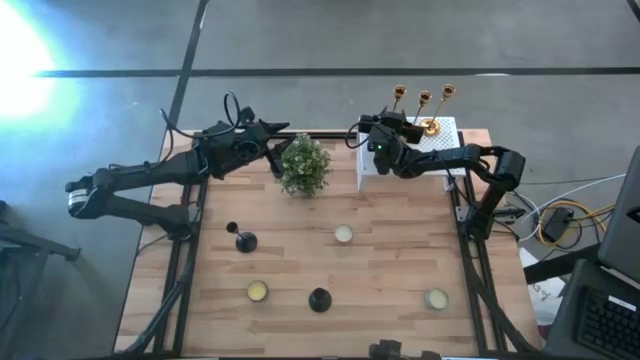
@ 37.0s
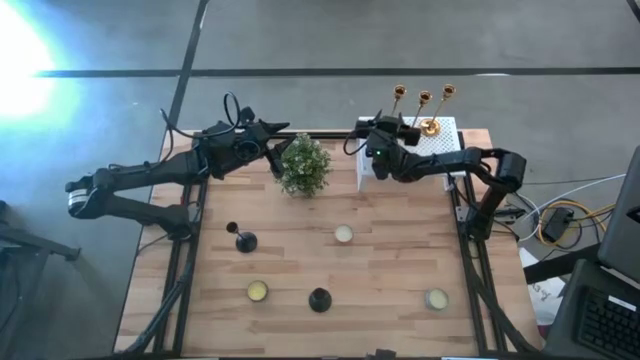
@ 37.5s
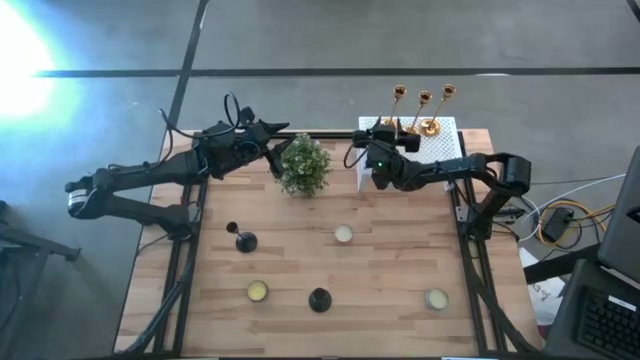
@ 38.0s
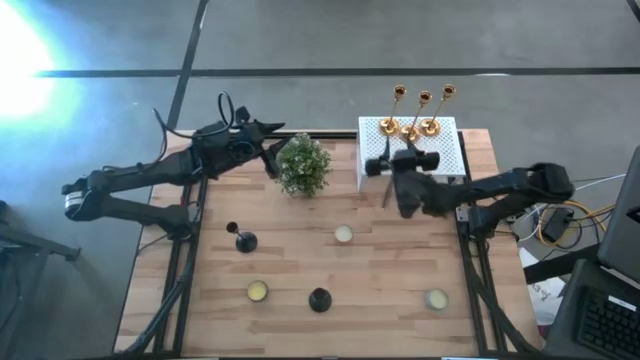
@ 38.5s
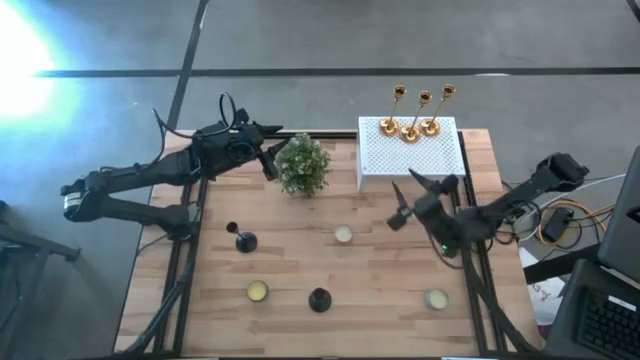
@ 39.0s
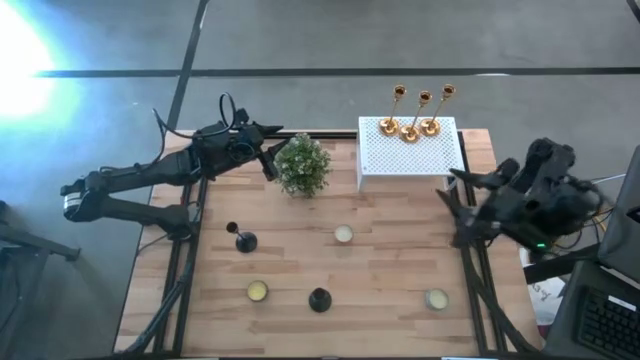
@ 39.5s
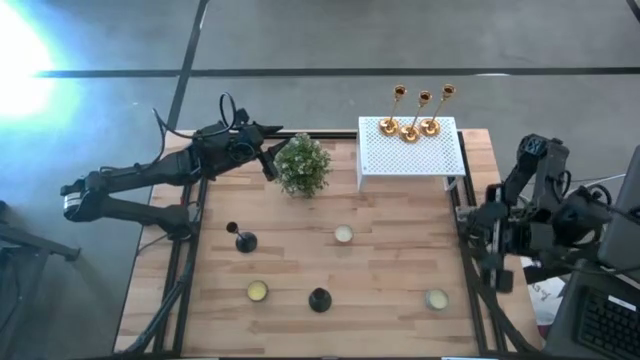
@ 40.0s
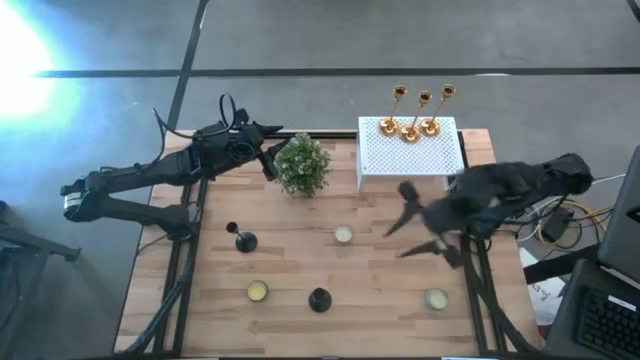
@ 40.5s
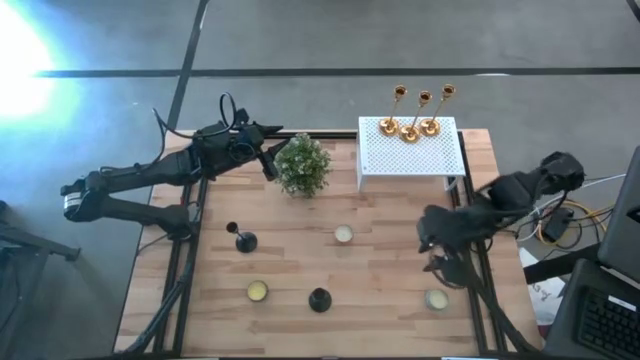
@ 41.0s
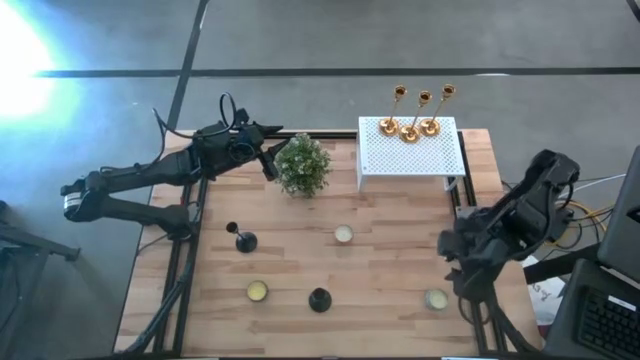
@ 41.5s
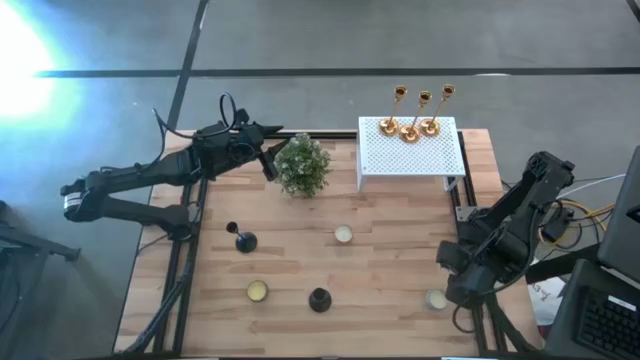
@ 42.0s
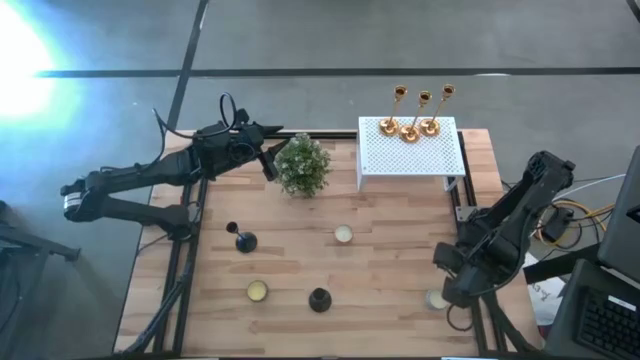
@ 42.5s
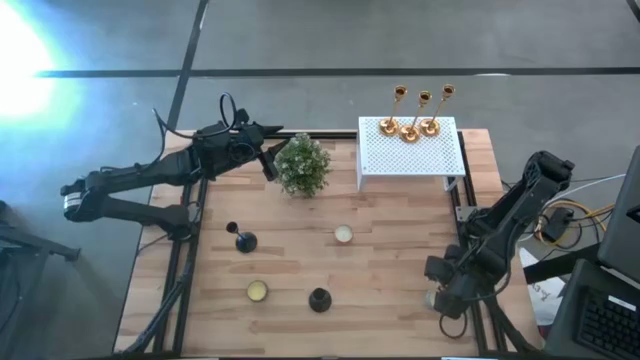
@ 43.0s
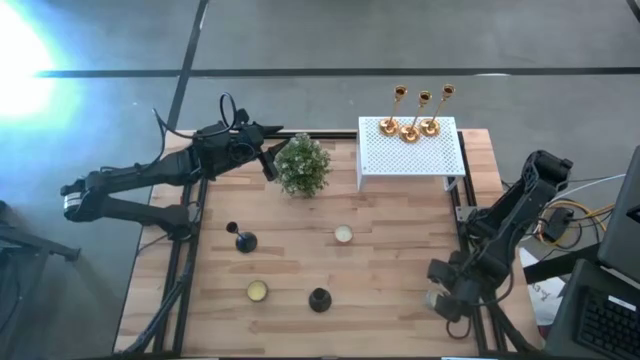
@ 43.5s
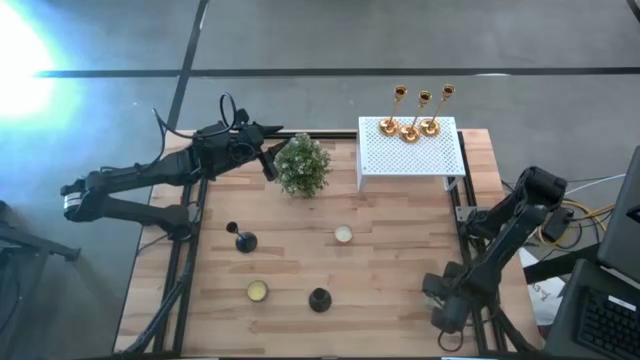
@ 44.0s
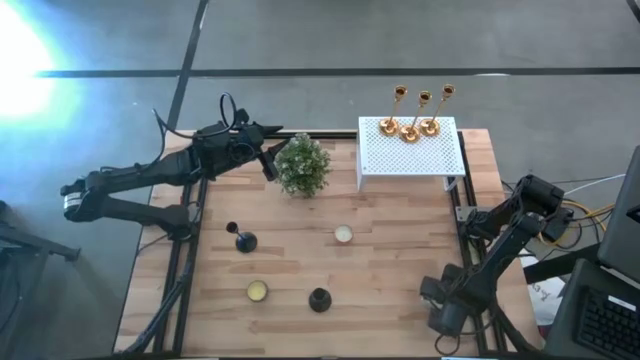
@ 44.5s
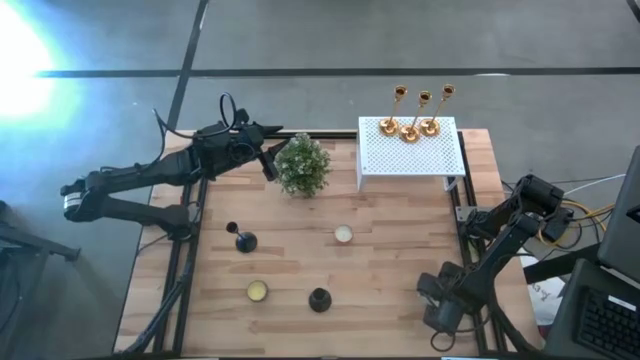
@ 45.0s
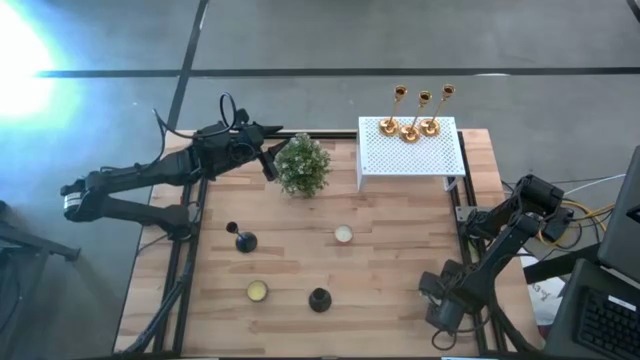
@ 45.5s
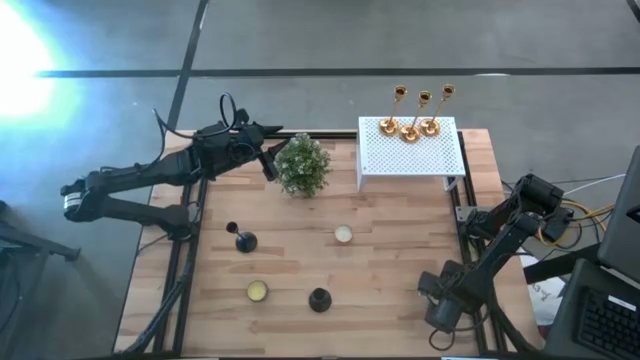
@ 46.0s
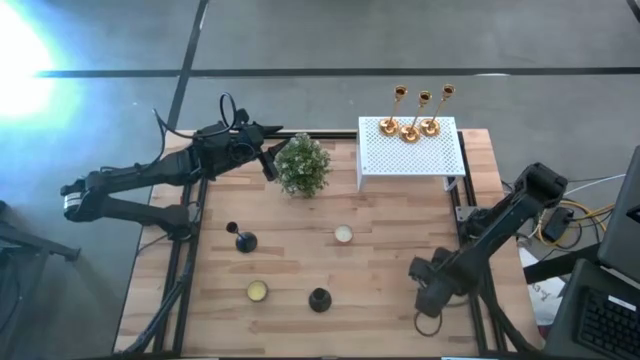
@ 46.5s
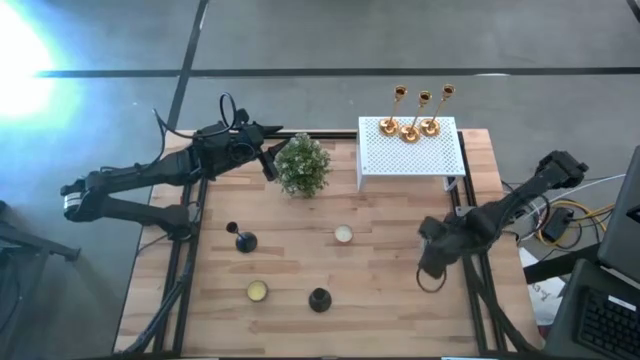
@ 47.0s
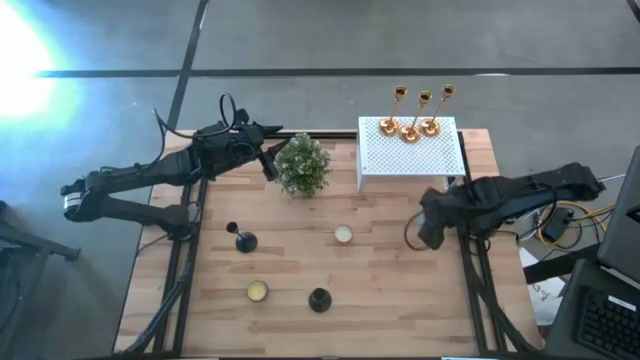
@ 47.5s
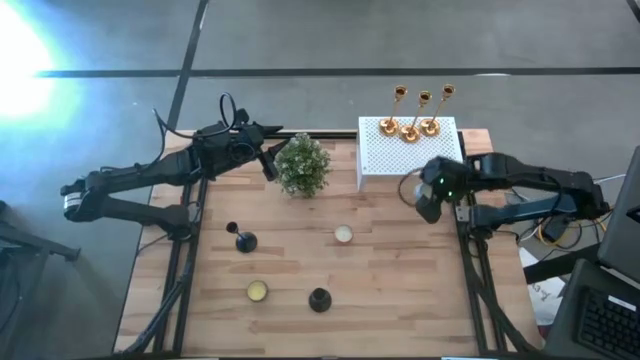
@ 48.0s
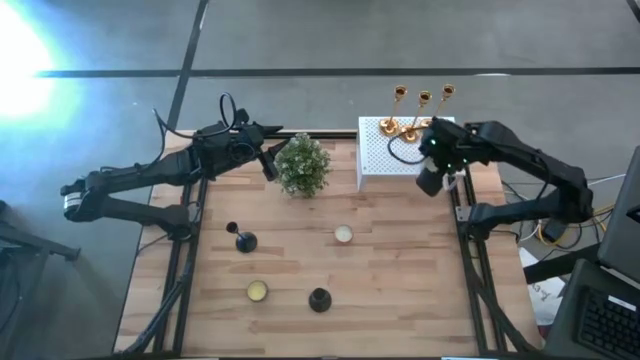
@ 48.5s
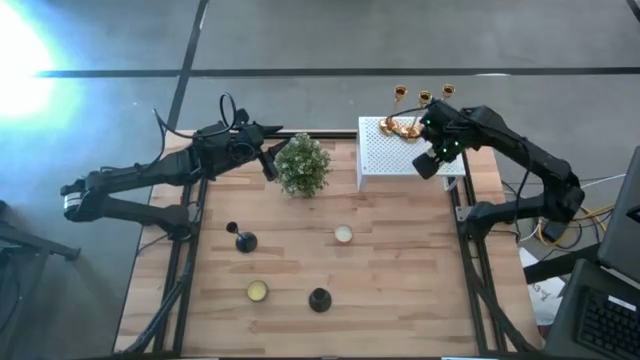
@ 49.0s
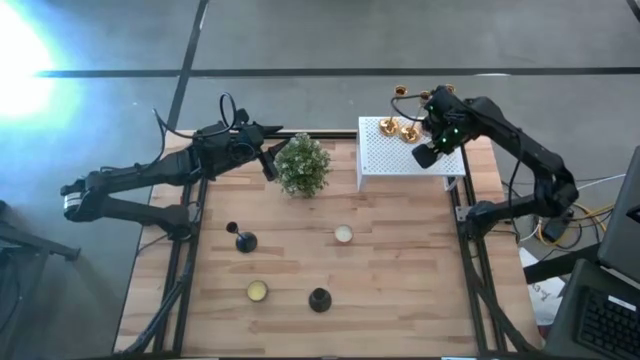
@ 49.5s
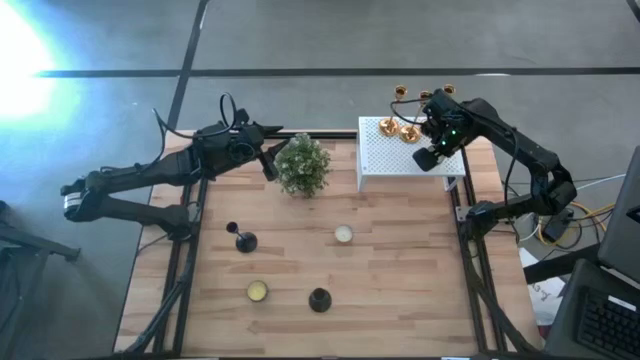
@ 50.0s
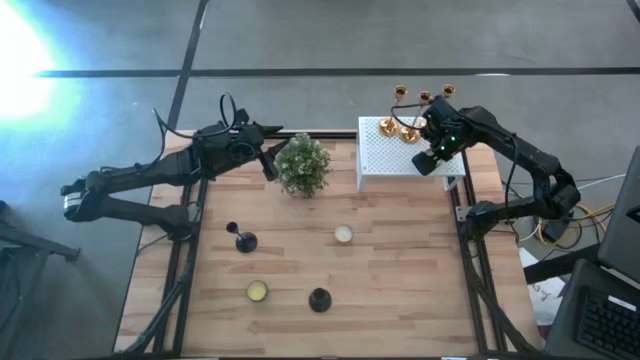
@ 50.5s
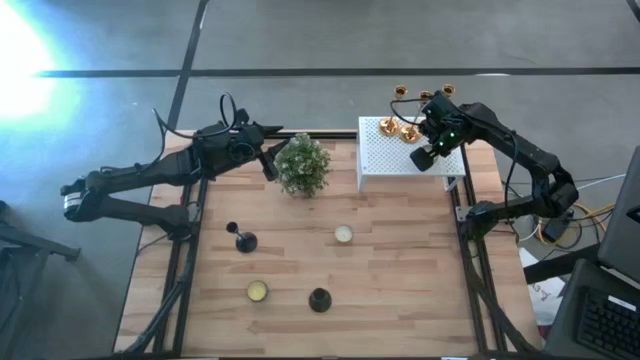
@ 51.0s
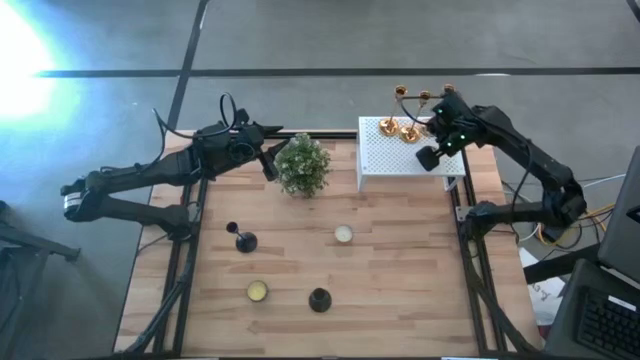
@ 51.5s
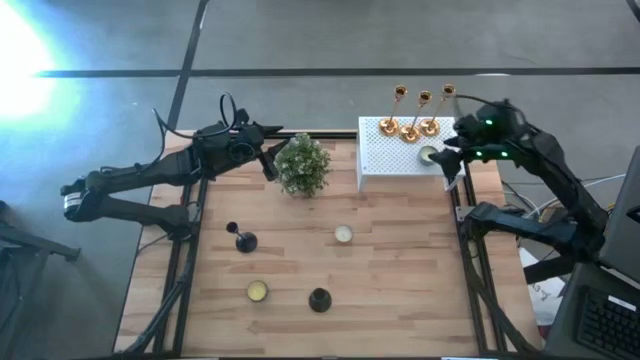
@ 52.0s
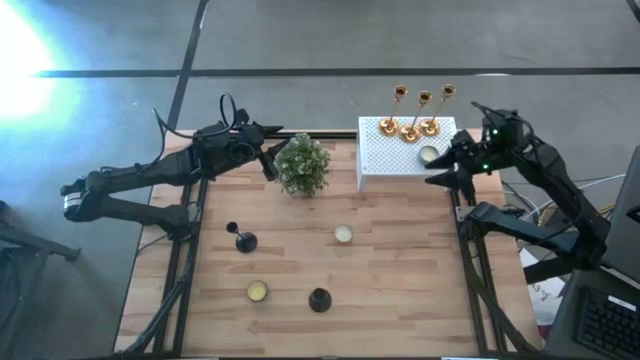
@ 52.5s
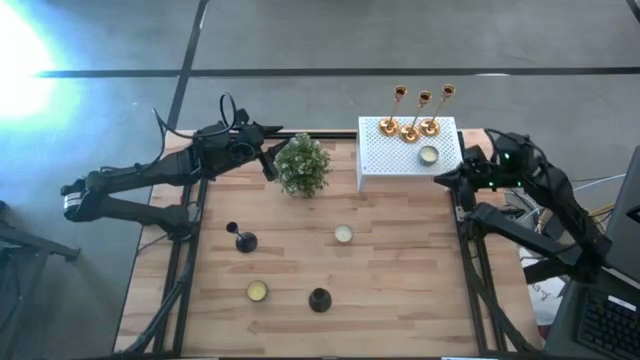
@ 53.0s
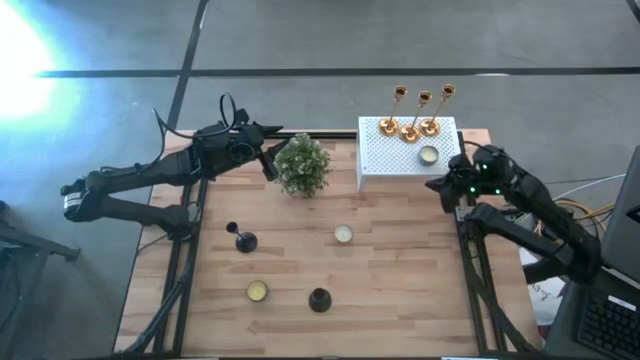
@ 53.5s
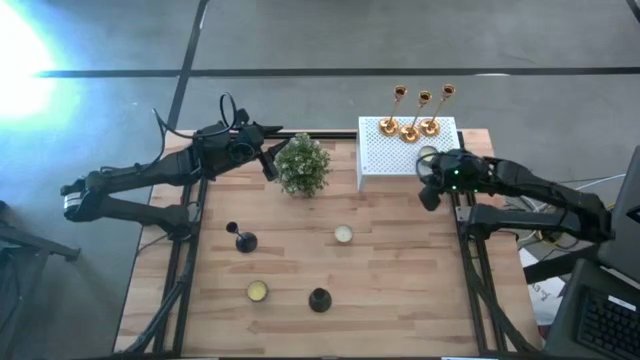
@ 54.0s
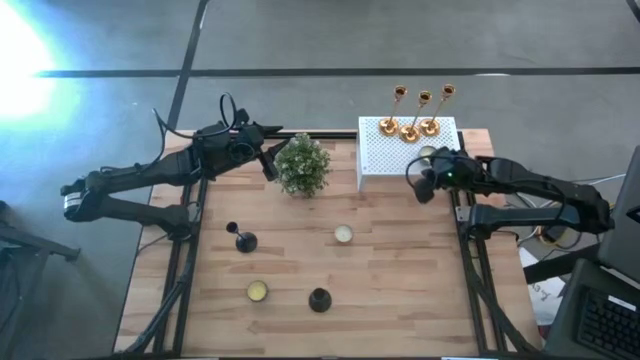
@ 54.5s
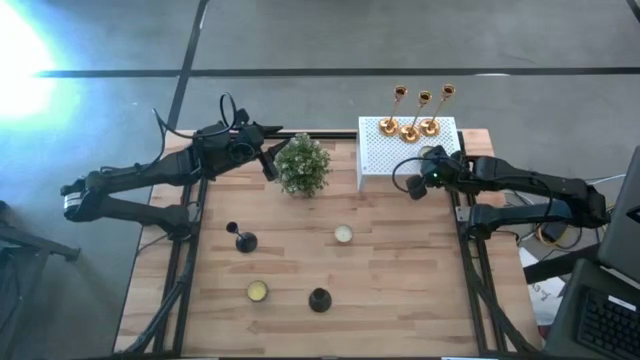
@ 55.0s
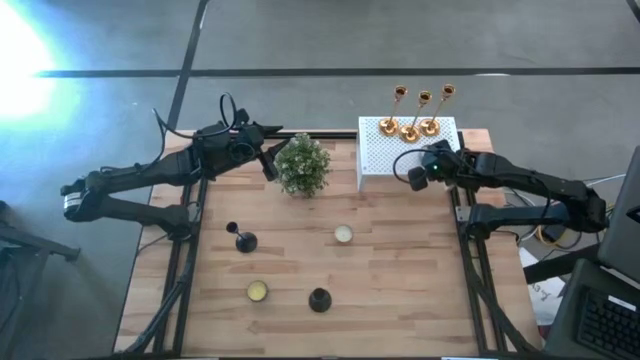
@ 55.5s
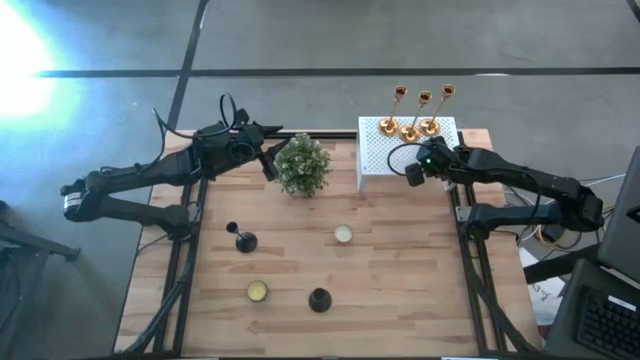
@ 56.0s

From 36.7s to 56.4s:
Task: Pick & Place candle stick holders
Put the blue scented candle on the shelf
